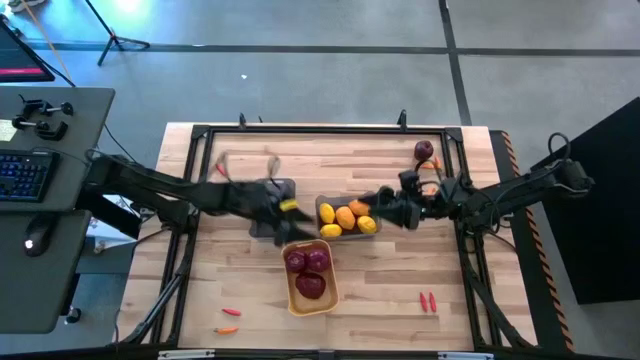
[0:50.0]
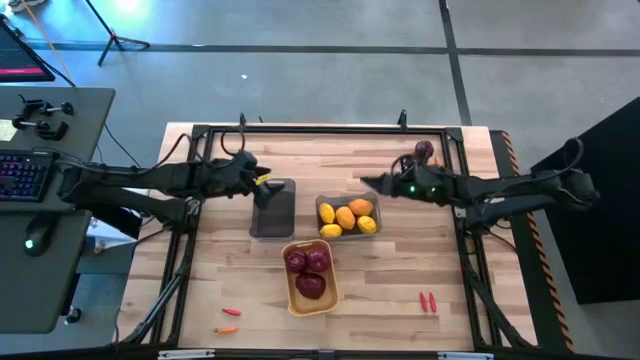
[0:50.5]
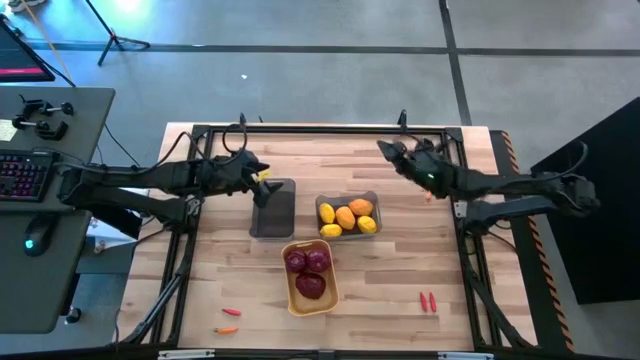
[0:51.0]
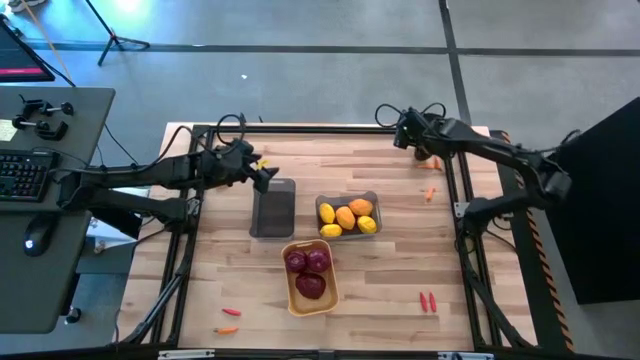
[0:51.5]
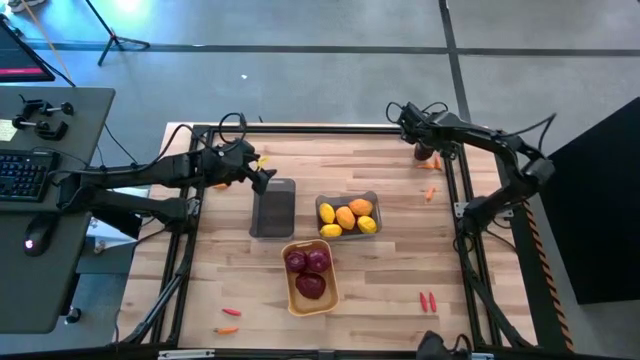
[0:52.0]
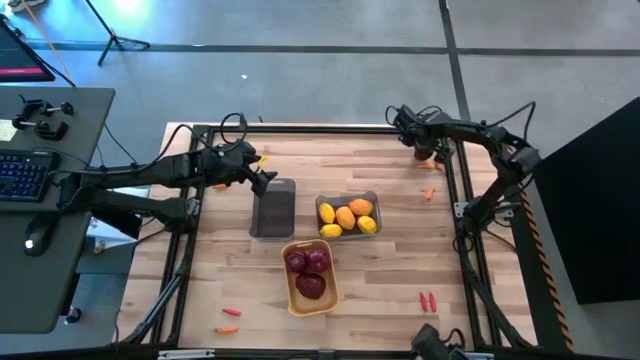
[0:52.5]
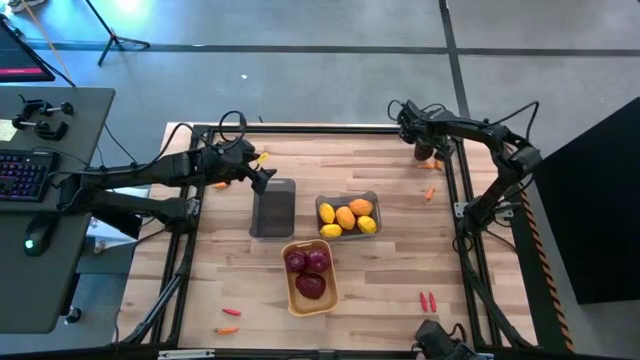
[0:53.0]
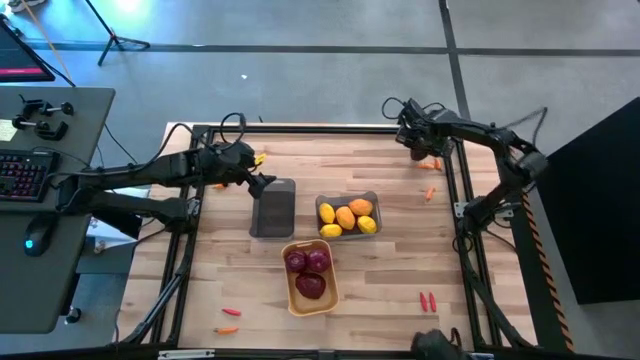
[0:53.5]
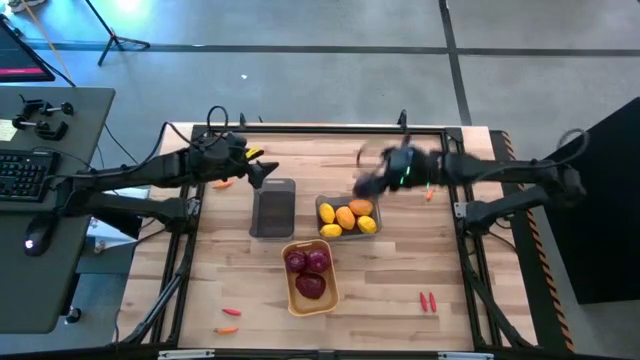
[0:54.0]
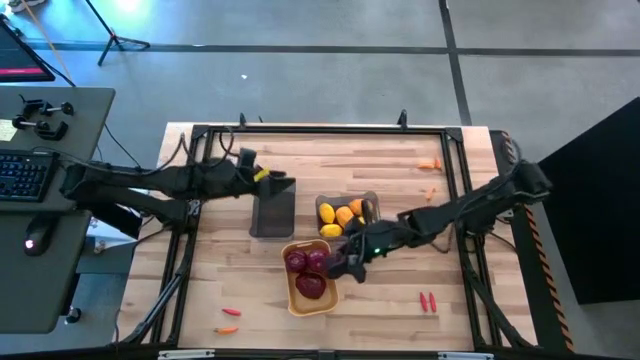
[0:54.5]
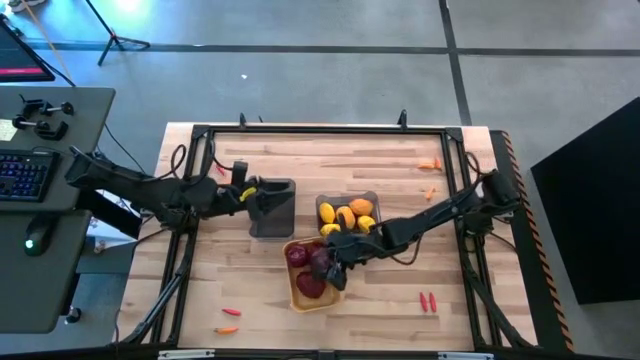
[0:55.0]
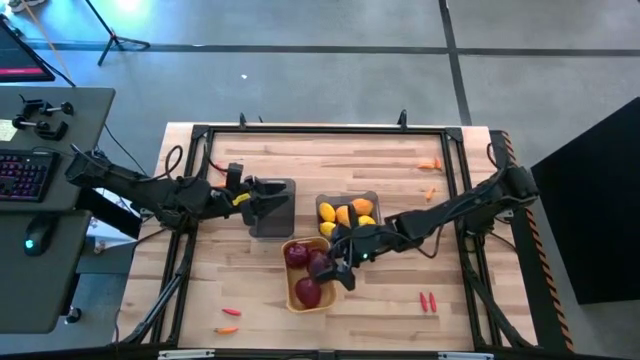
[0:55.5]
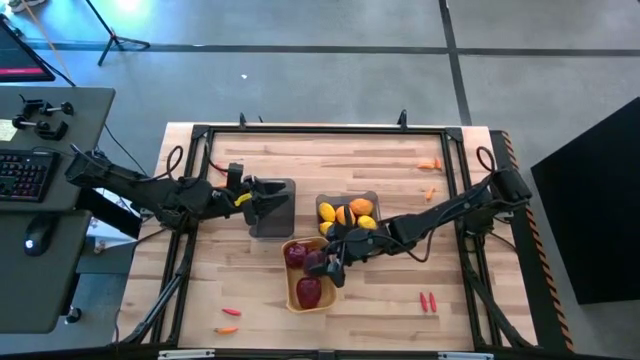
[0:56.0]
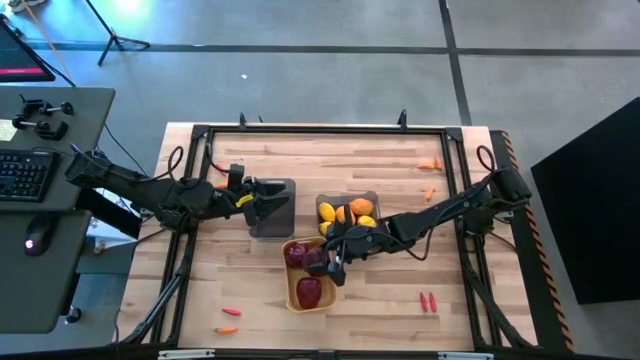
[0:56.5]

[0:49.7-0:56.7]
Task: Sort produce into baskets
Put the apple into the yellow bin

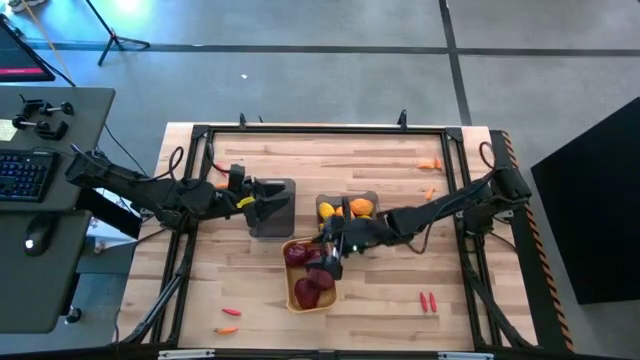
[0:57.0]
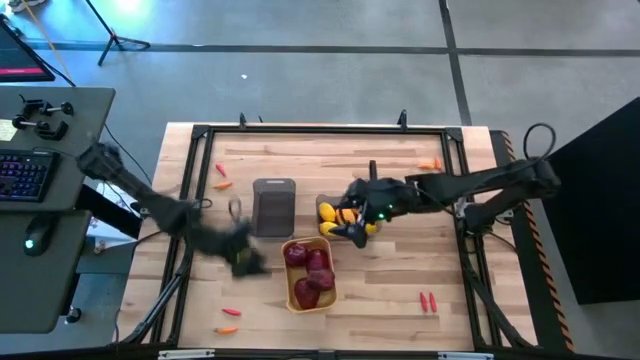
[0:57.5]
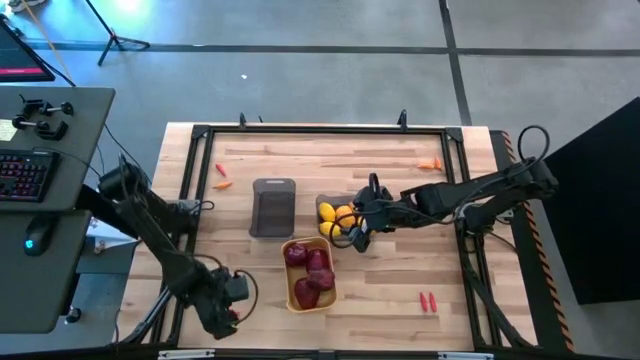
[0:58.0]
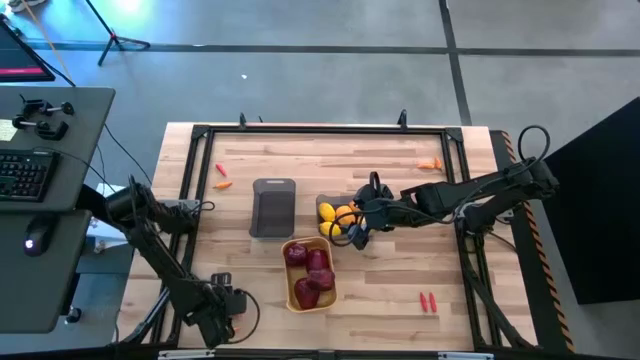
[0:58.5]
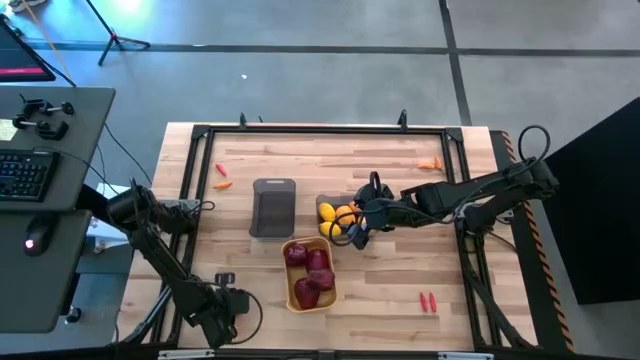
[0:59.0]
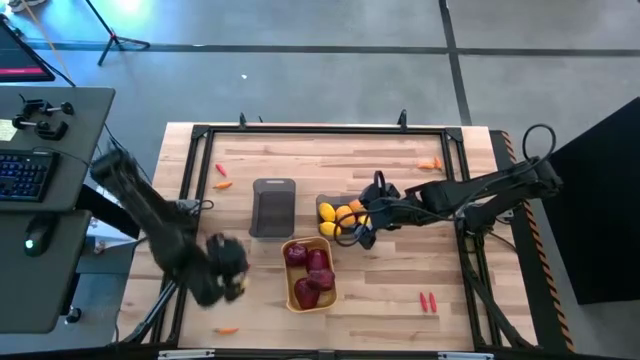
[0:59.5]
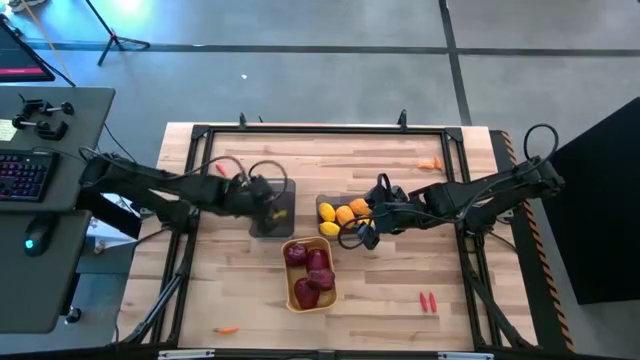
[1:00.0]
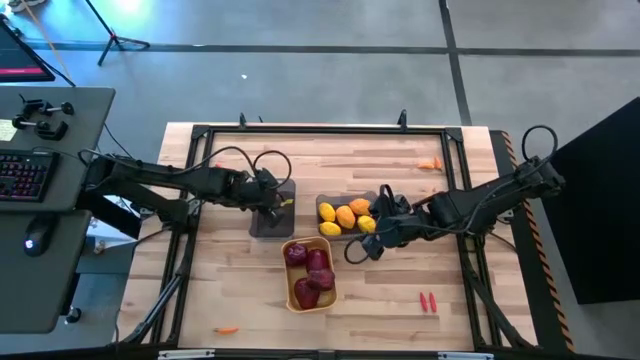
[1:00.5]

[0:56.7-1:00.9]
Put the orange chili pepper into the left black bin

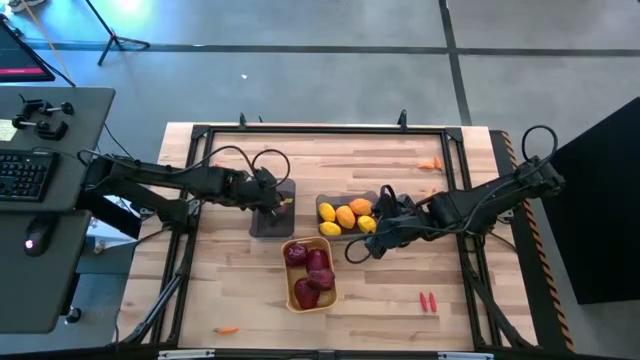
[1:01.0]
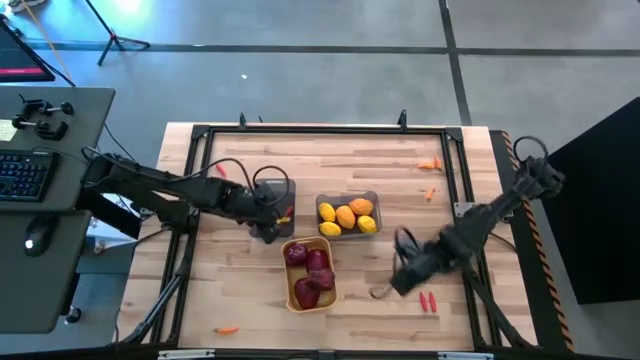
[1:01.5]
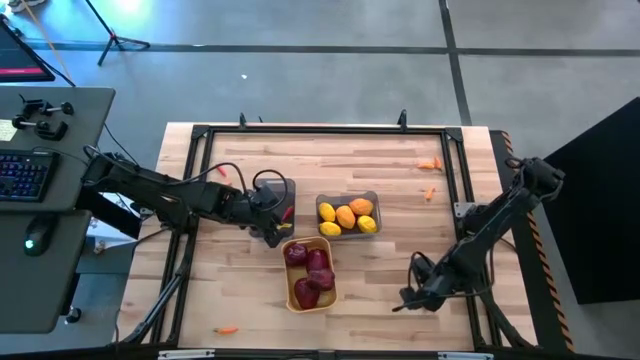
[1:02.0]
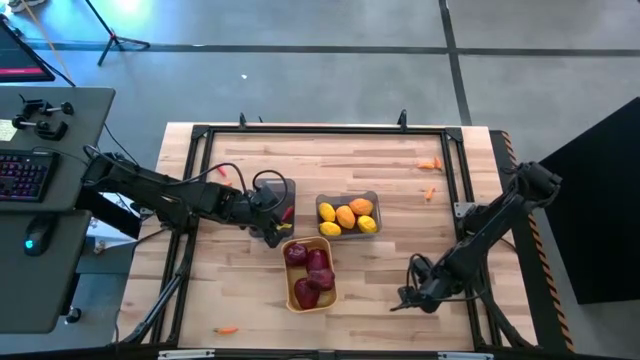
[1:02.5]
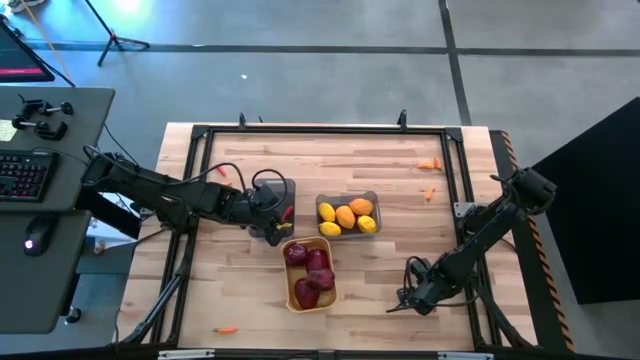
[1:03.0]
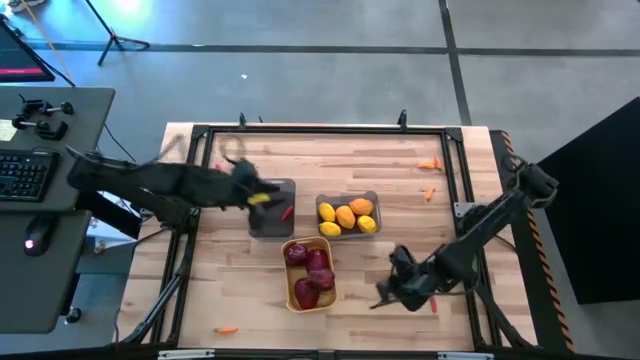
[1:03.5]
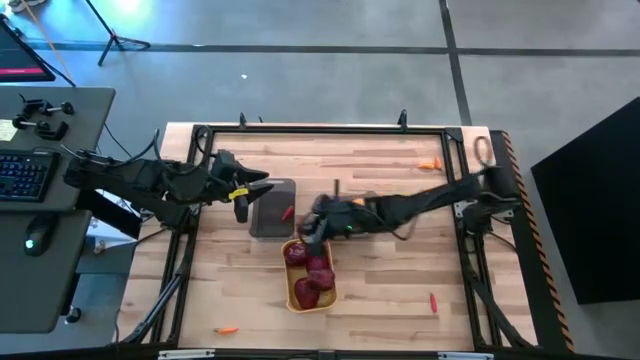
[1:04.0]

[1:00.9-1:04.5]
Put the orange chili pepper into the left black bin

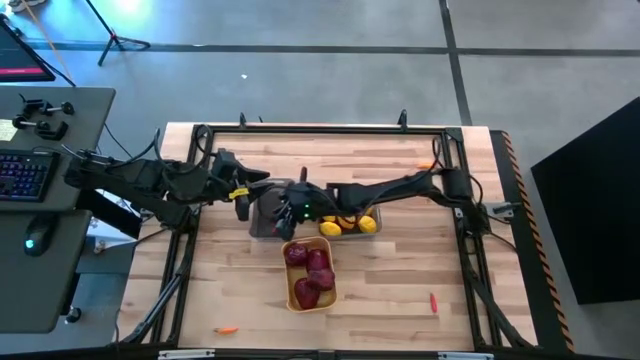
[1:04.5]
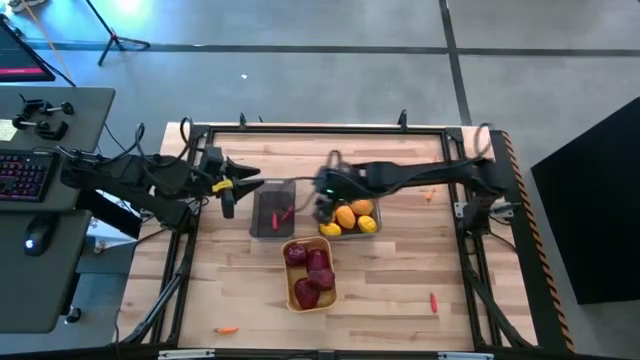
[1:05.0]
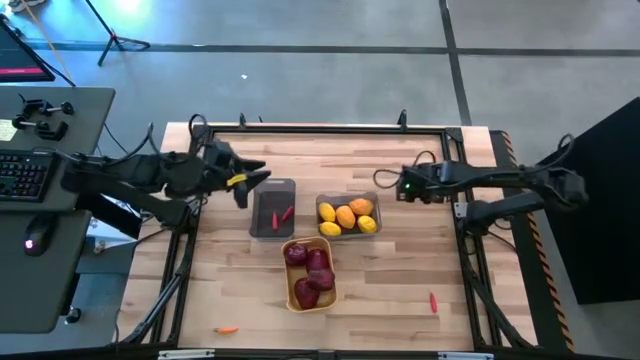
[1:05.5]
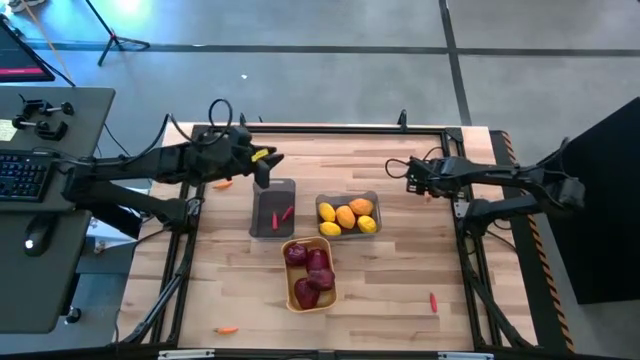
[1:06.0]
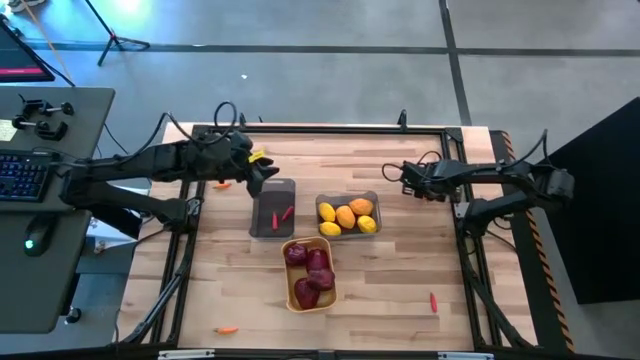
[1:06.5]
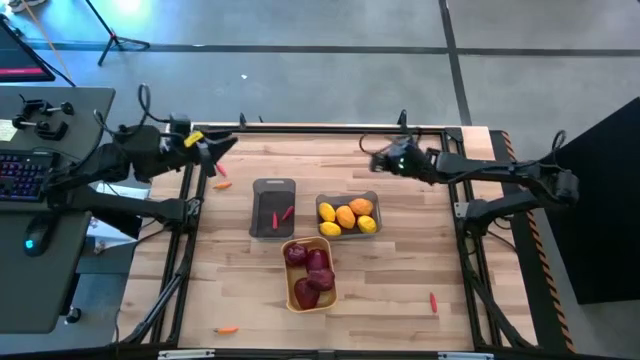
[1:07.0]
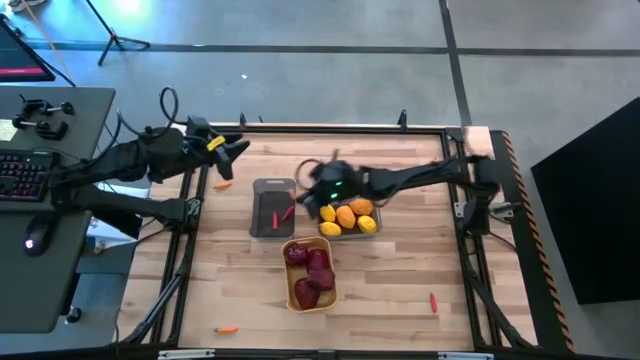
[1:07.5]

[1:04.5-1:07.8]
Put the yellow chili pepper into the left black bin

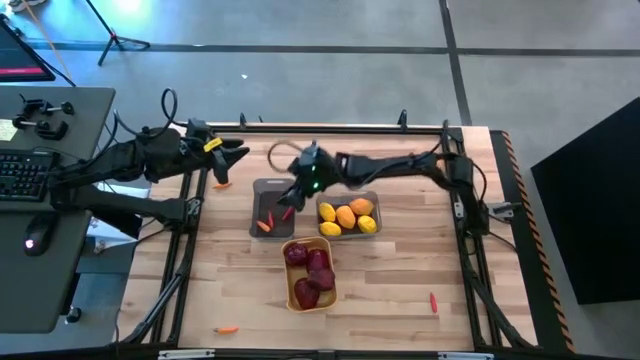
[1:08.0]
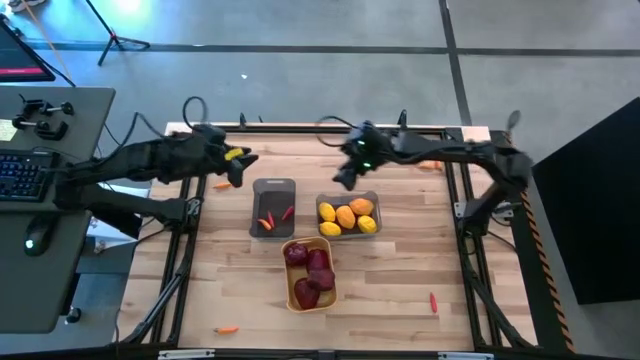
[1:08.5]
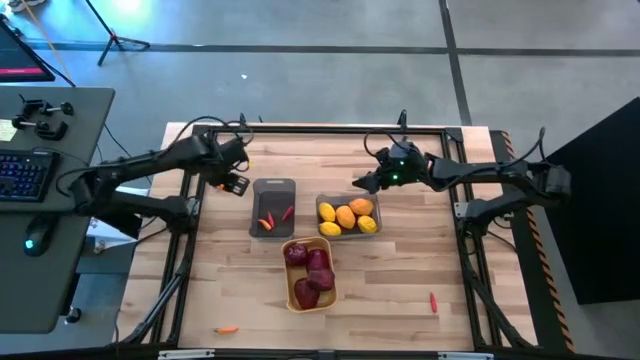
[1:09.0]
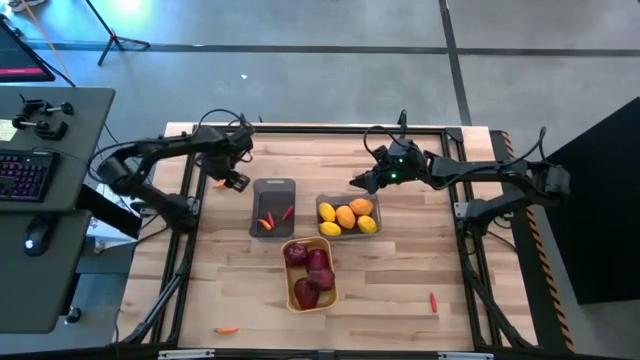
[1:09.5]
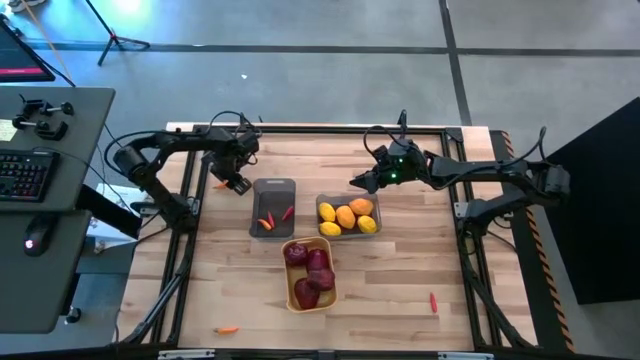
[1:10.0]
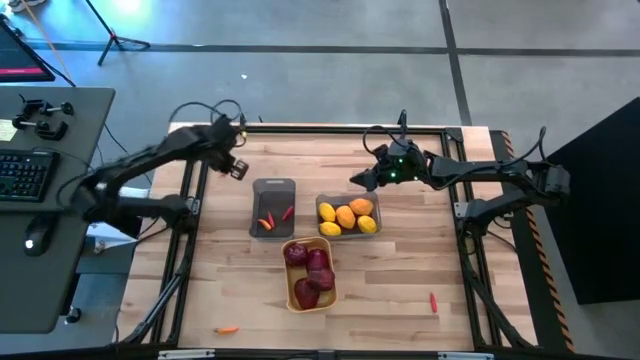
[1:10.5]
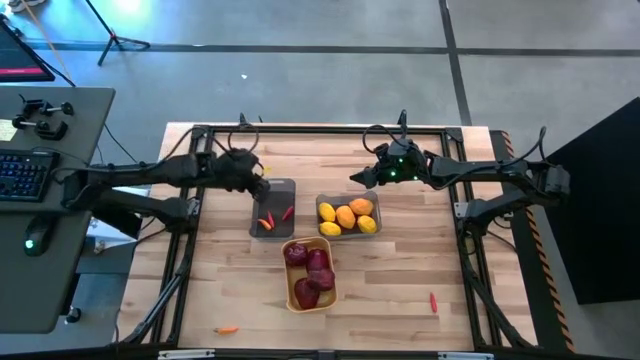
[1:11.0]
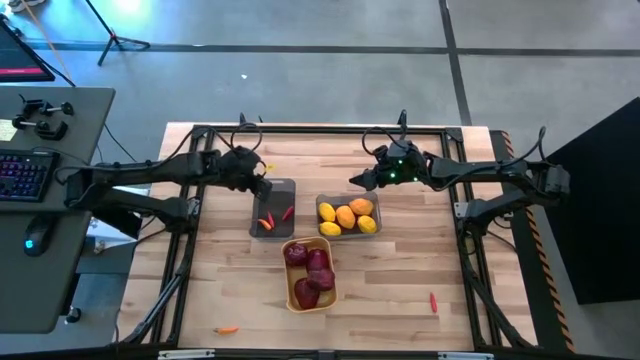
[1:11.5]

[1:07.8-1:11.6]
Put the yellow chili pepper into the left black bin
